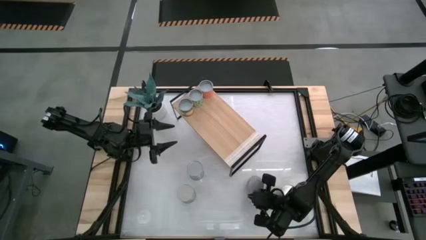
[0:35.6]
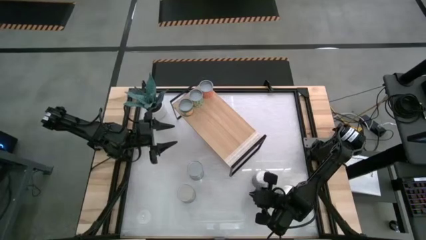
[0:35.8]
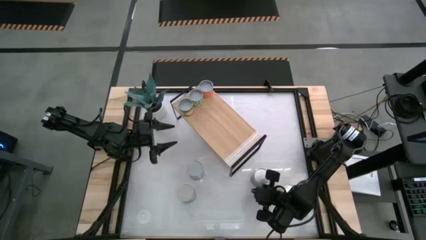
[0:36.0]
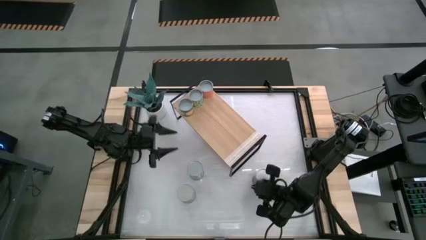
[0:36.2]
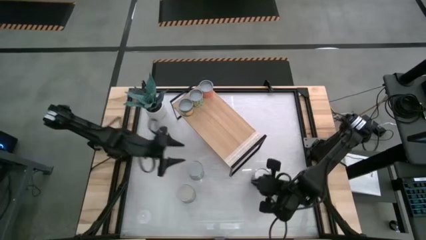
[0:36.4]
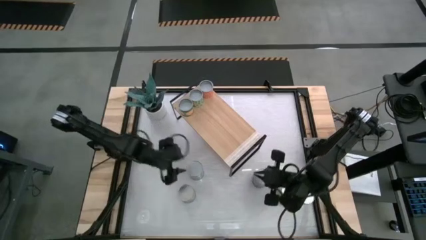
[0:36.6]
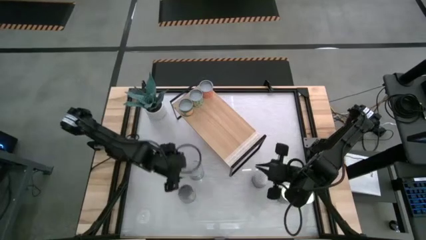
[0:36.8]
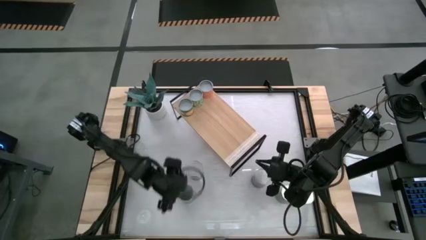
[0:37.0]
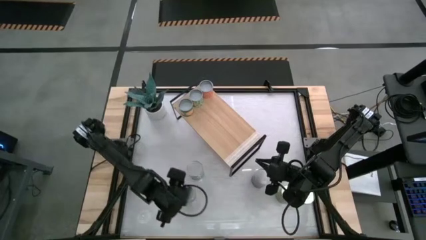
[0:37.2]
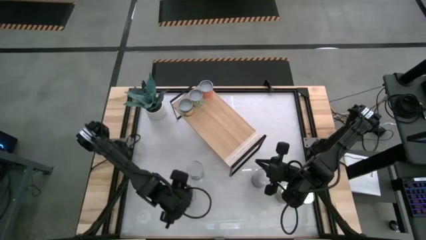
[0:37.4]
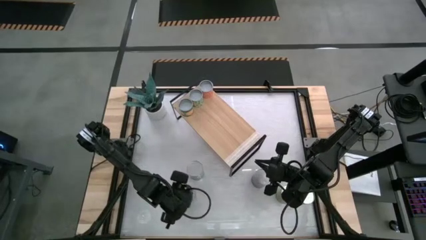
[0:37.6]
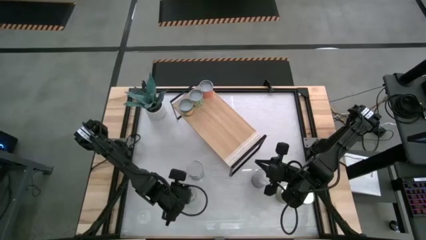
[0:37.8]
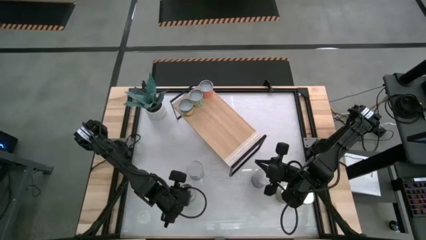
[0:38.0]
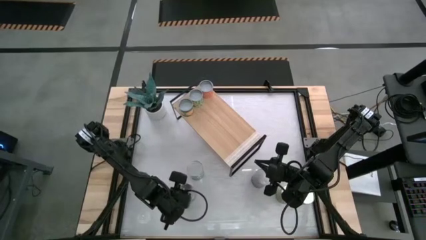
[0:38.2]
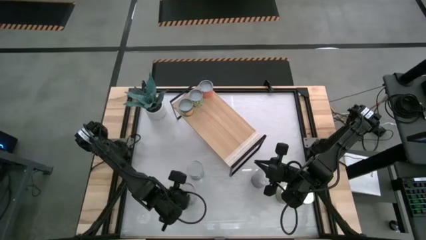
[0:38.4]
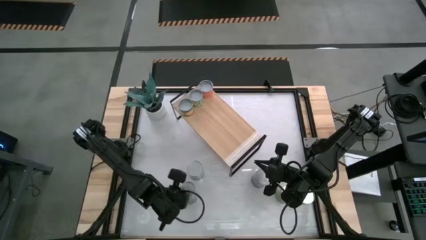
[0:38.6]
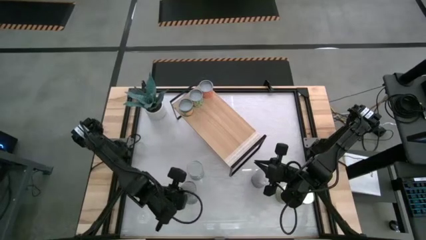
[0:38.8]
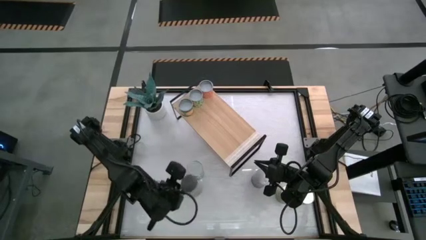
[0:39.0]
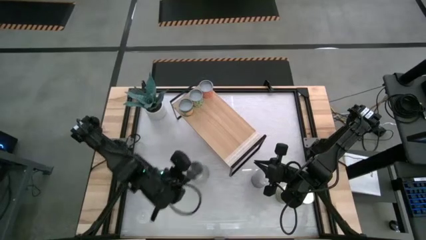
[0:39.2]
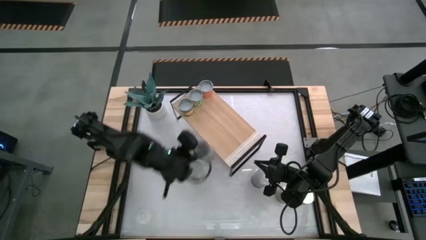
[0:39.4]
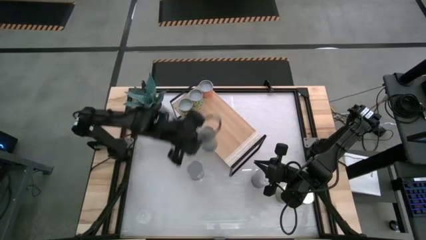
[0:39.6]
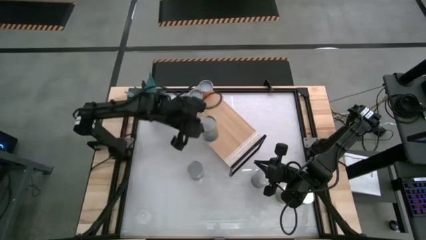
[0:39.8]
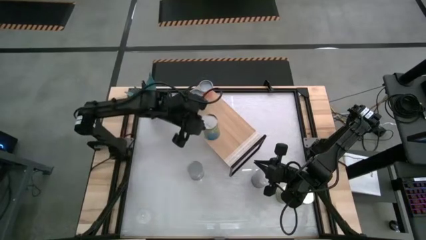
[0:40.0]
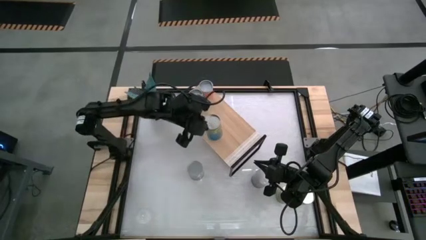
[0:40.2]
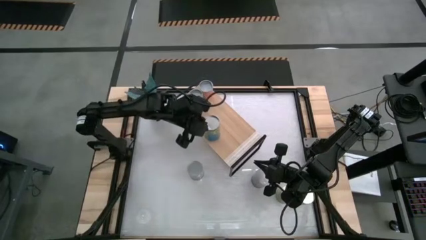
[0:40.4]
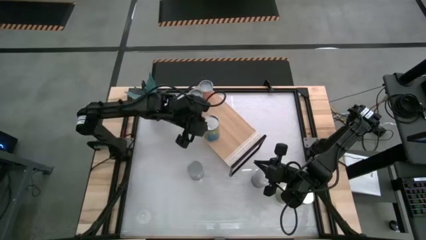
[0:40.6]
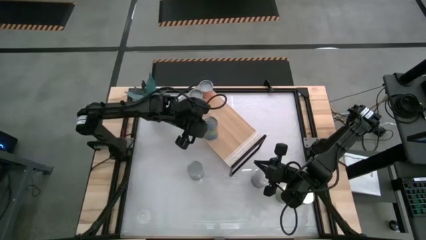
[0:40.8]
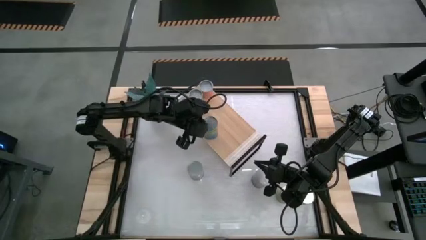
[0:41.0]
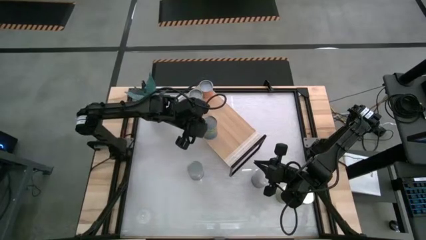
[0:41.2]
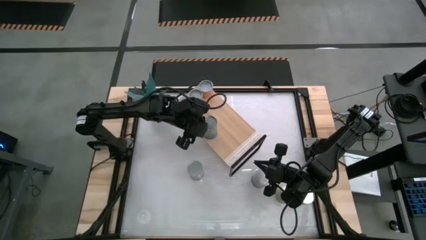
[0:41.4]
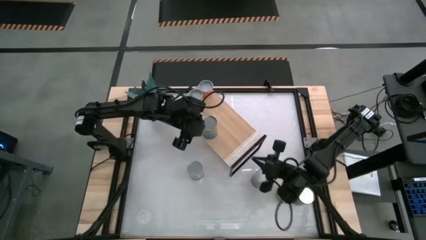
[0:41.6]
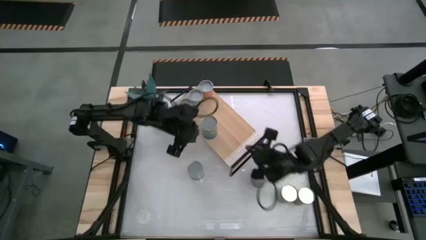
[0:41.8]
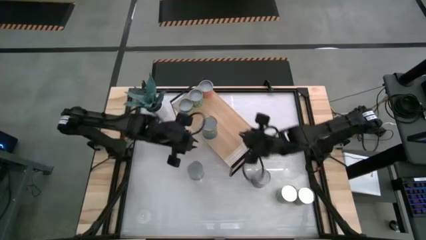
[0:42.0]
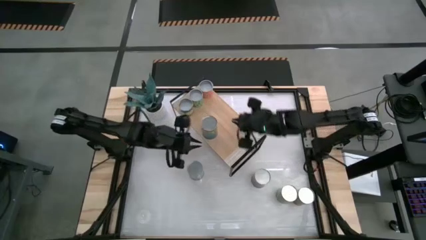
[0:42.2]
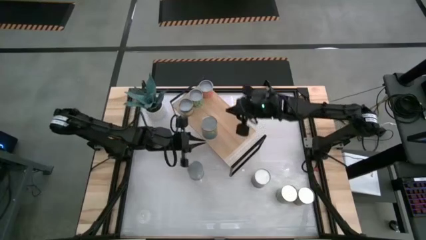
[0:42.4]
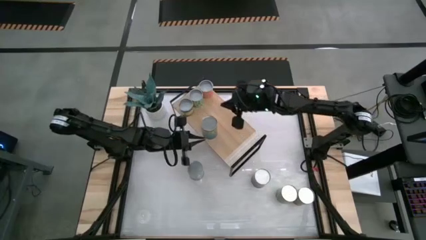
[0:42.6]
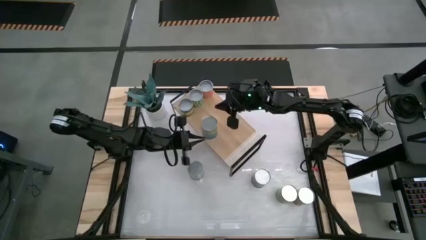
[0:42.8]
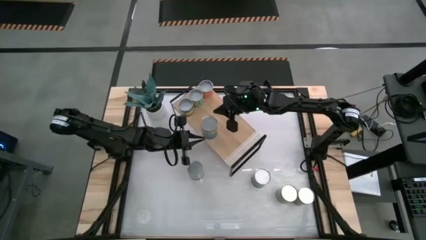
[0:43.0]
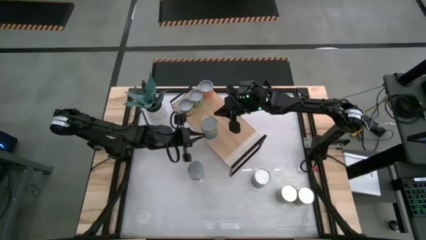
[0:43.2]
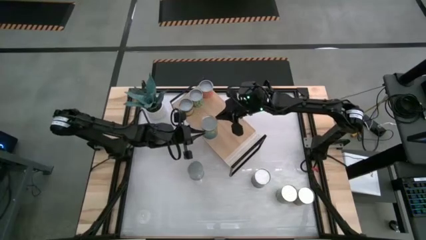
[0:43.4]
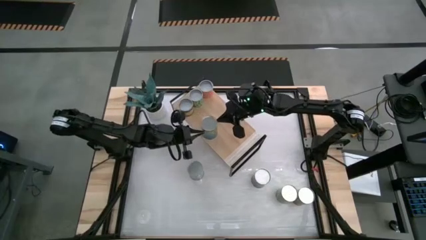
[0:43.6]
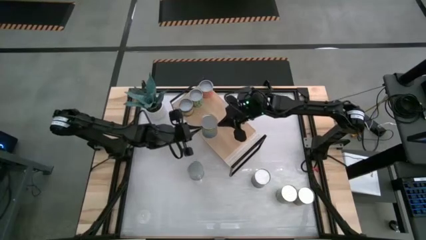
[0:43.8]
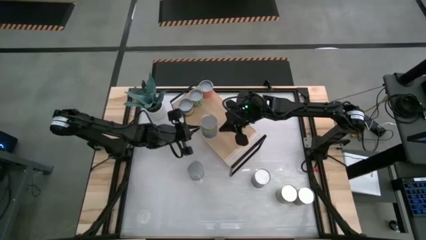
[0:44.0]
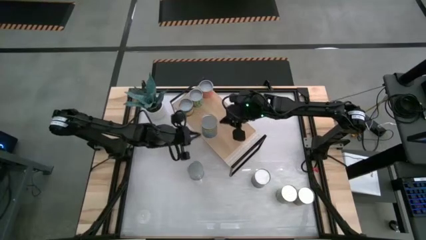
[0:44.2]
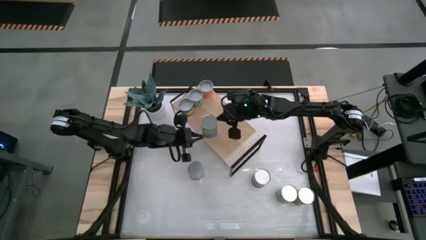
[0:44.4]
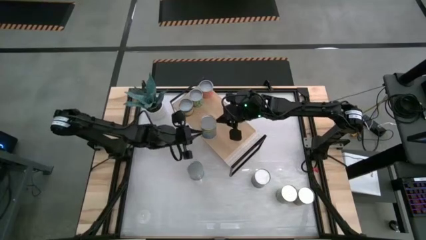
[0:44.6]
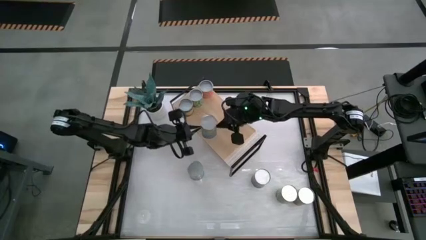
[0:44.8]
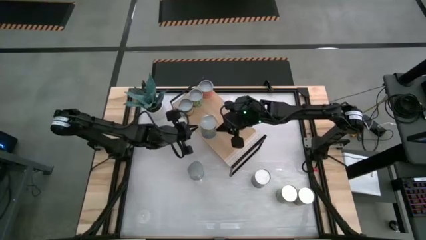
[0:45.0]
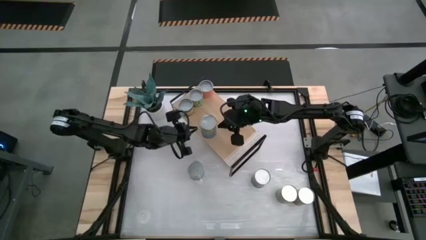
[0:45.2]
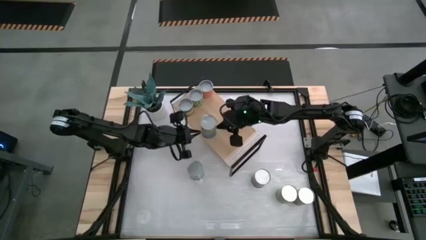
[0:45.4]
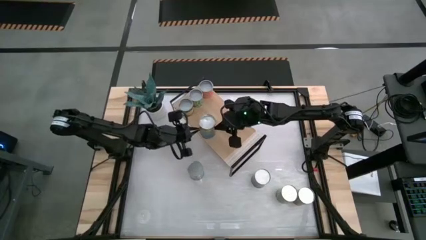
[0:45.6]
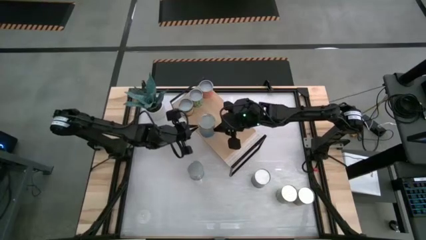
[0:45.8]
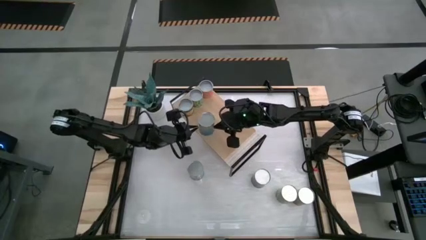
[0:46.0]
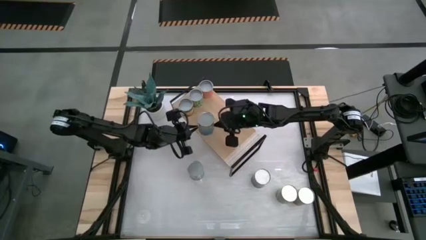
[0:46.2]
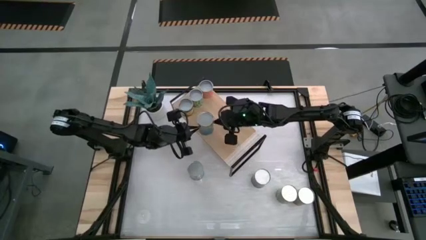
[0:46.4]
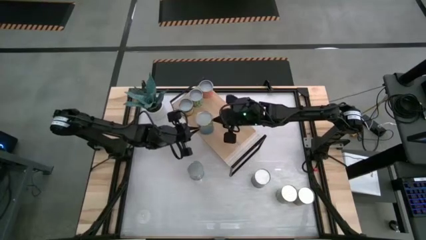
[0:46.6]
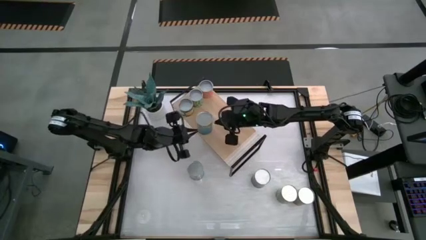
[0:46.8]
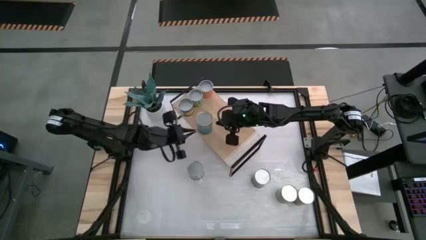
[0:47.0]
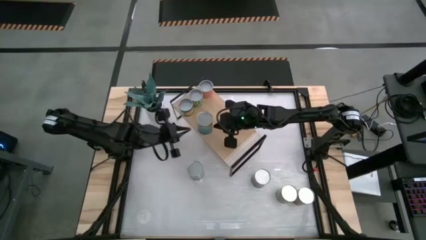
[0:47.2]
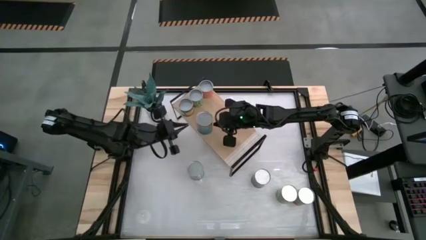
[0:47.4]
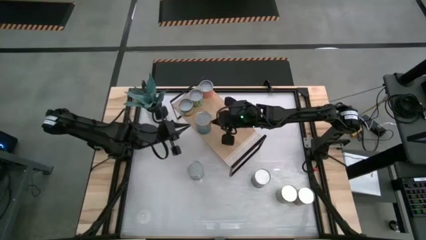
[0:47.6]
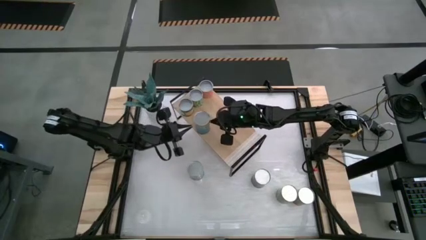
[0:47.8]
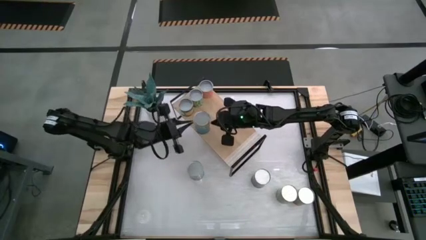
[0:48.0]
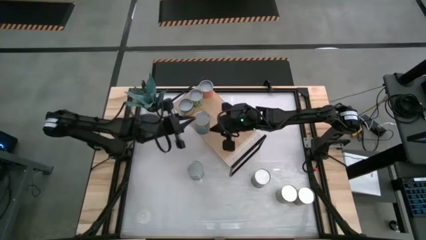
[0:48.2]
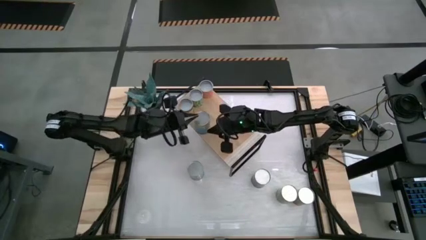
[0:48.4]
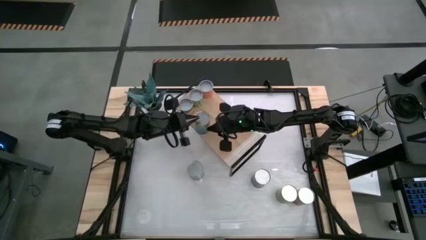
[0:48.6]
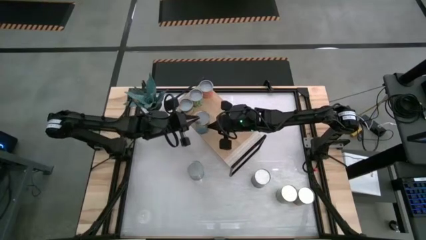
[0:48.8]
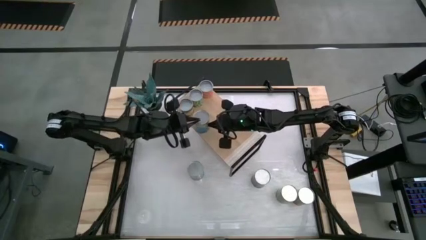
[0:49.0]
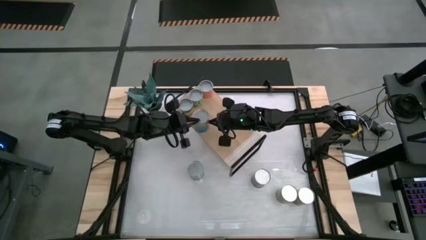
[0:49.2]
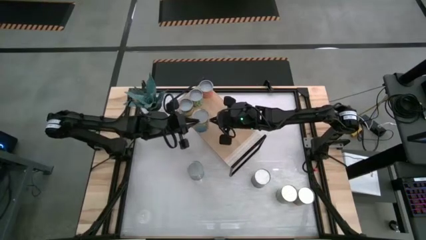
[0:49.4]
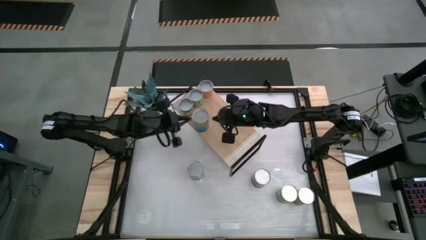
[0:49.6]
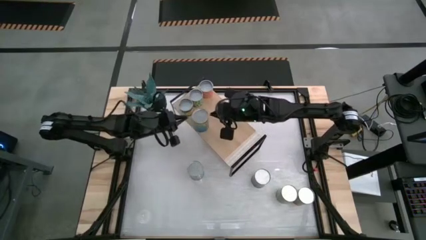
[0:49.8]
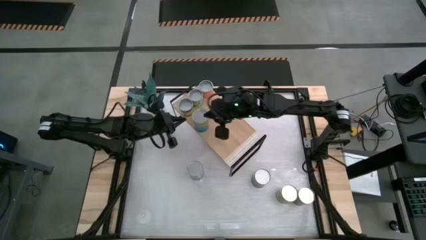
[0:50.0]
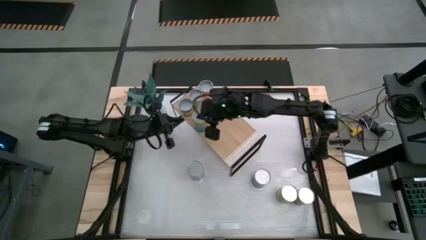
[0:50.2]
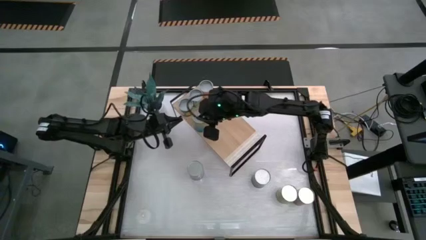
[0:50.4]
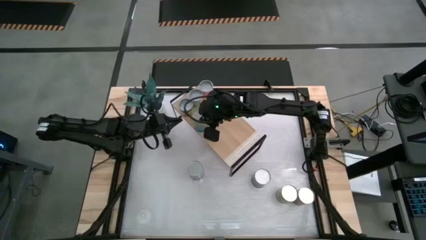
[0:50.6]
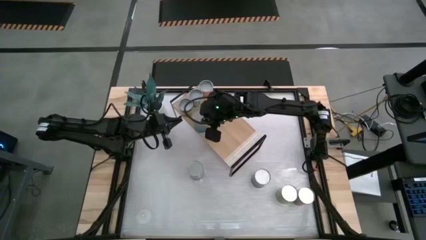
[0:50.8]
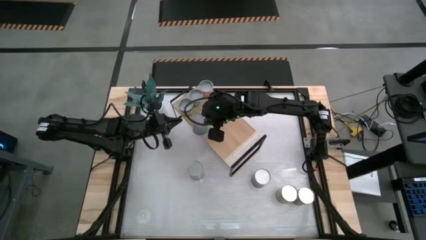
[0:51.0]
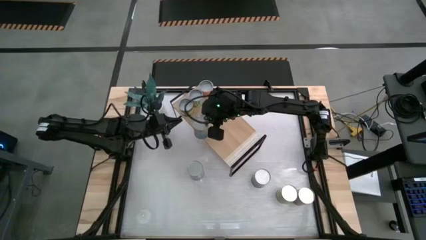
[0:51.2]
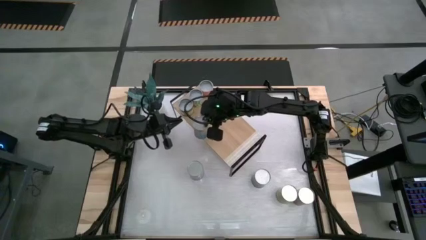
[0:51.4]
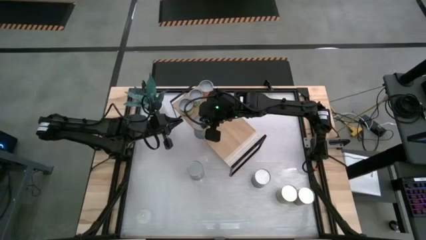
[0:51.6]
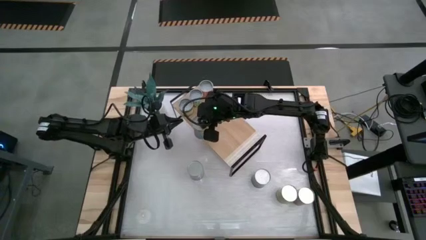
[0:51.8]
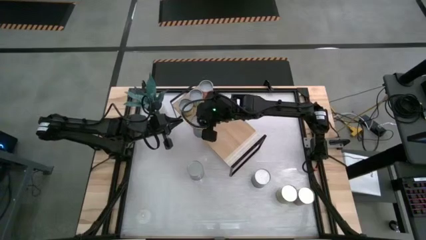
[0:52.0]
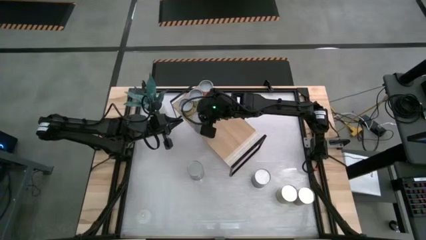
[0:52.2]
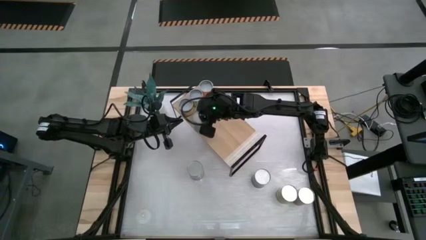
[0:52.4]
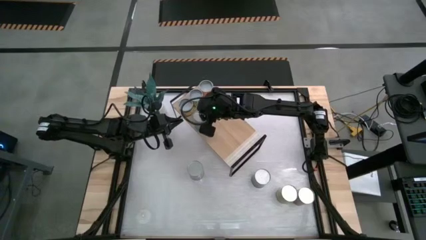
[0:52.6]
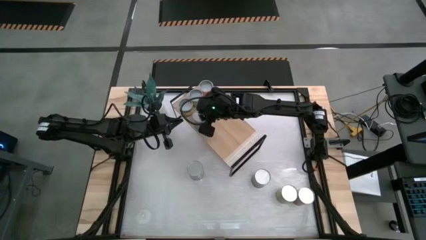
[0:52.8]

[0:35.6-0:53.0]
Task: Pick and place cans onto a shelf
Put the canned cherries on the shelf
